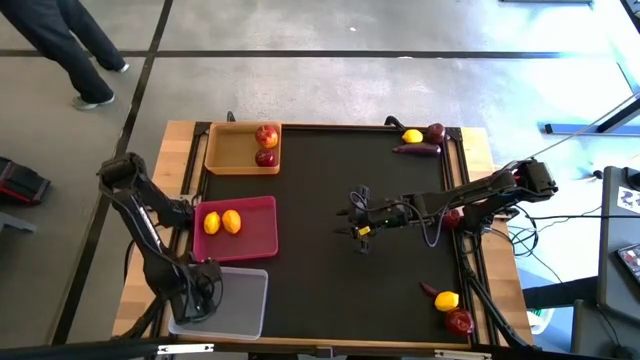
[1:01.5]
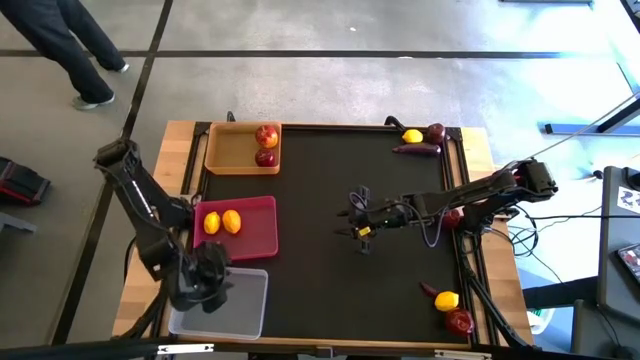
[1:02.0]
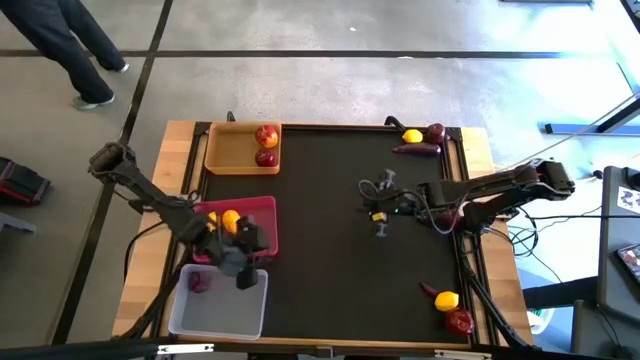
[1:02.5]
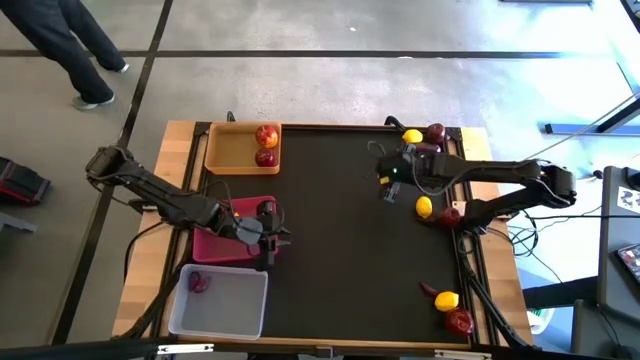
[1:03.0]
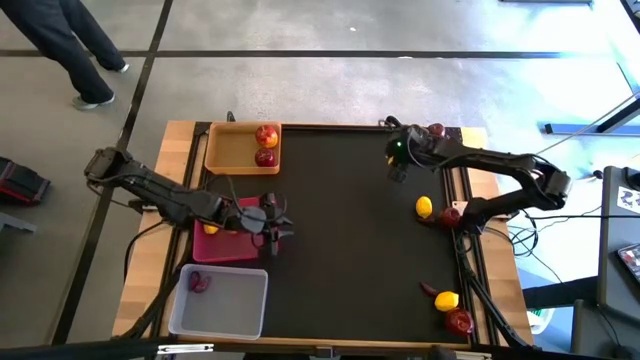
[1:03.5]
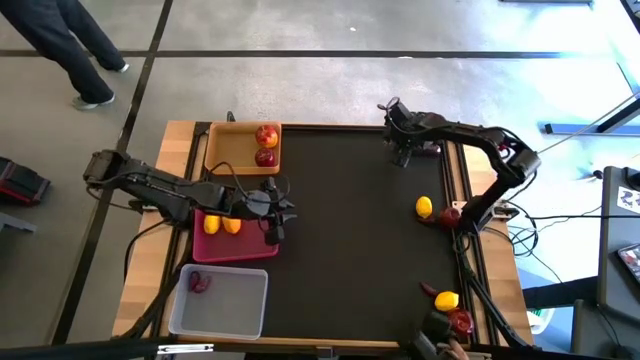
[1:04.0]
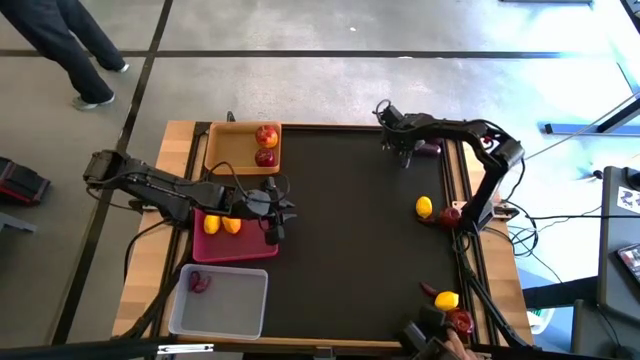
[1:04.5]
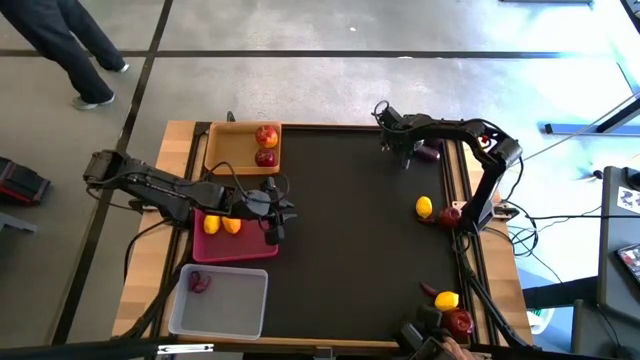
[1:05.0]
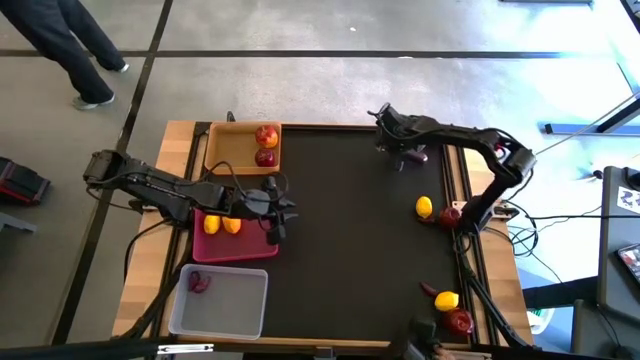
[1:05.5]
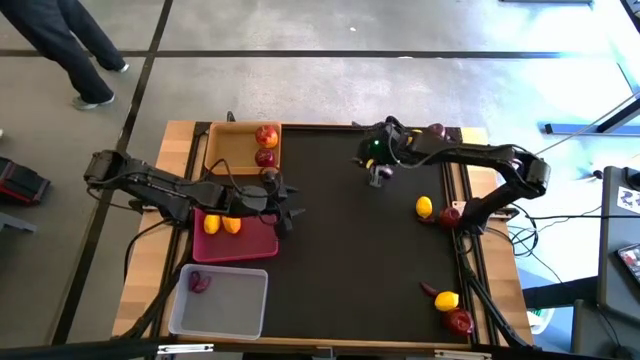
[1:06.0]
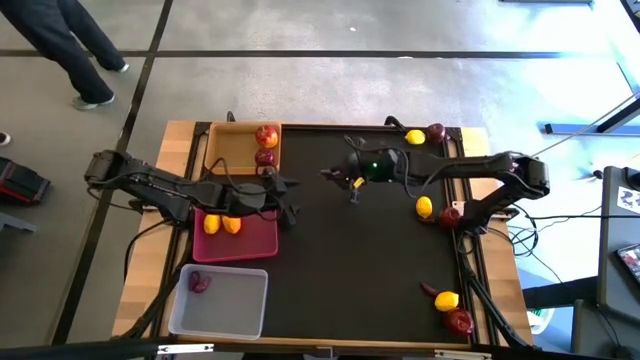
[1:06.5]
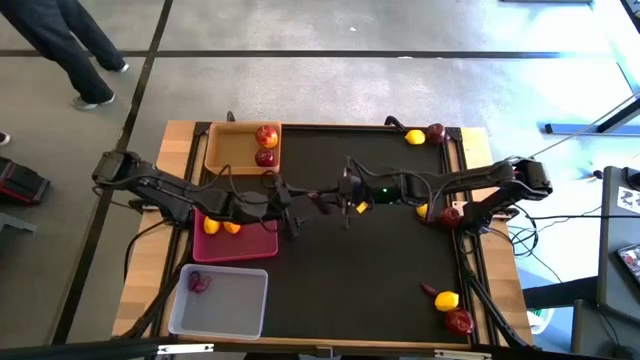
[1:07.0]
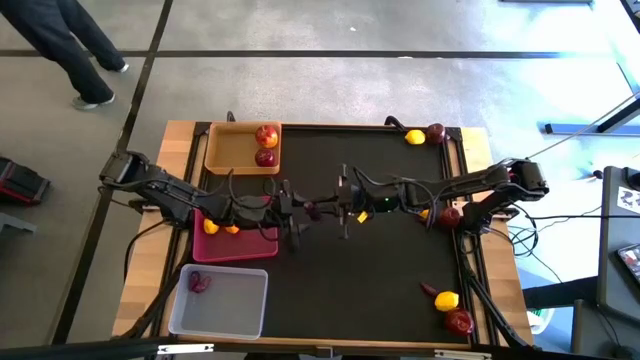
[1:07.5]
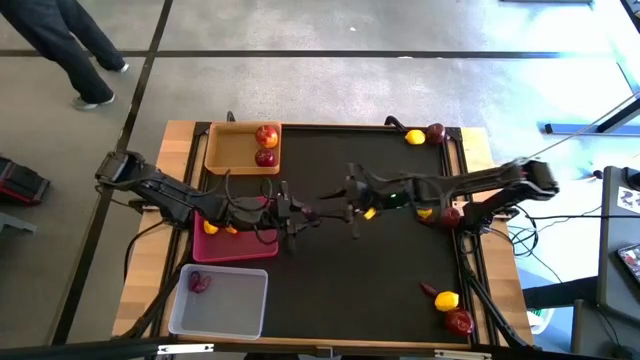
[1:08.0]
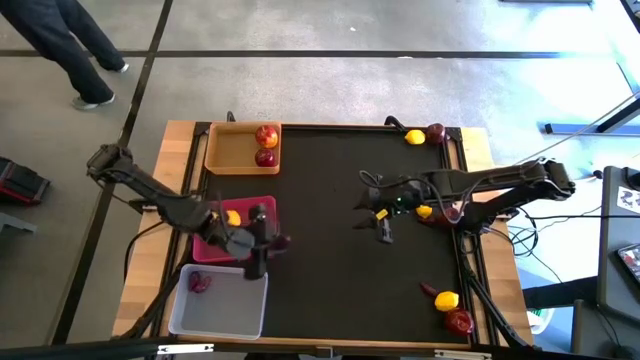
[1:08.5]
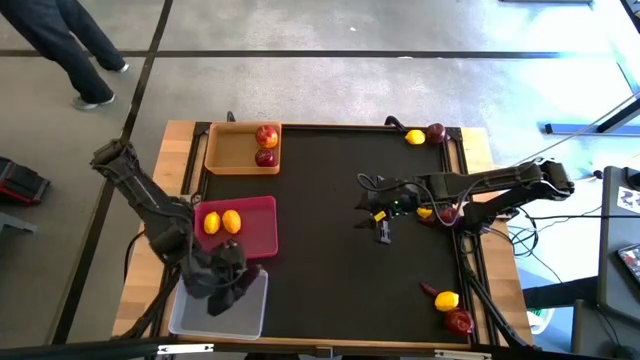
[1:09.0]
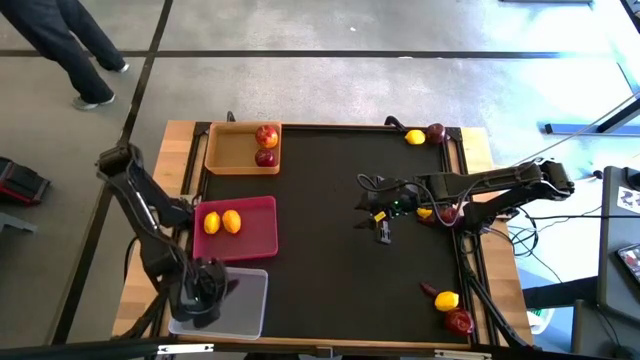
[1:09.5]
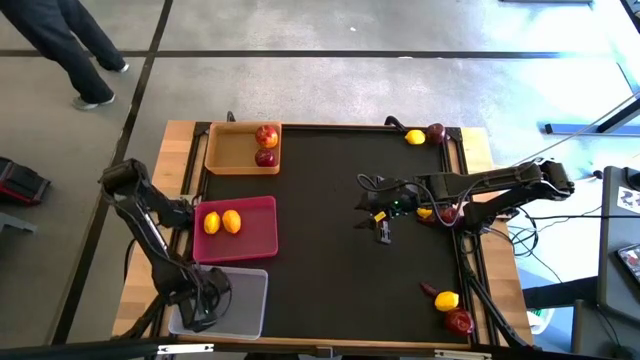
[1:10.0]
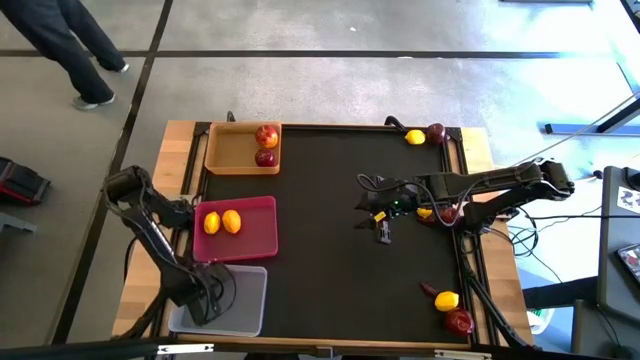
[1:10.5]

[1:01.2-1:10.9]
Task: Sort produce into baskets
Put the top eggplant into the transparent bin

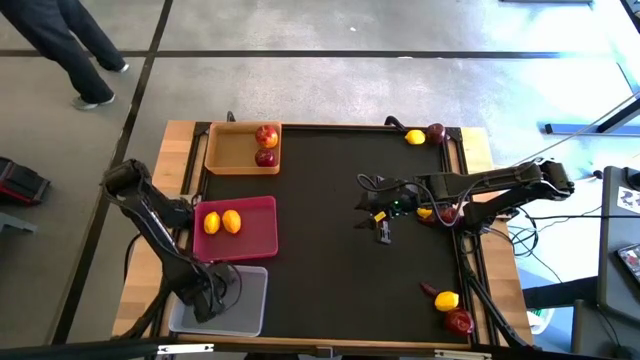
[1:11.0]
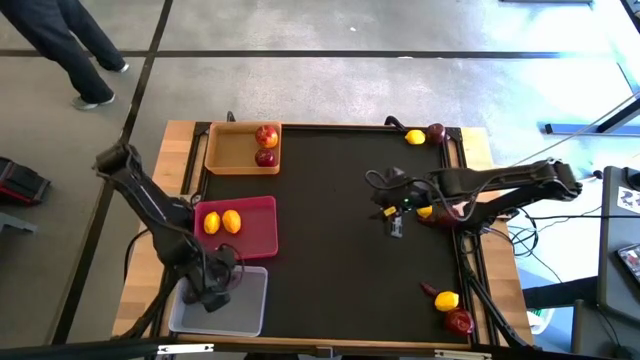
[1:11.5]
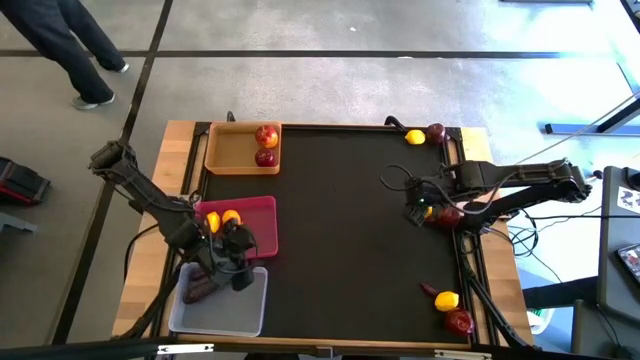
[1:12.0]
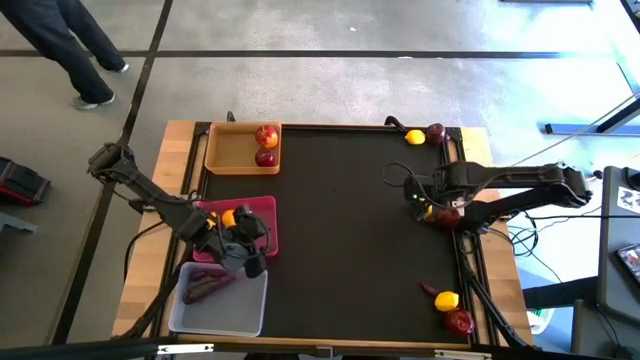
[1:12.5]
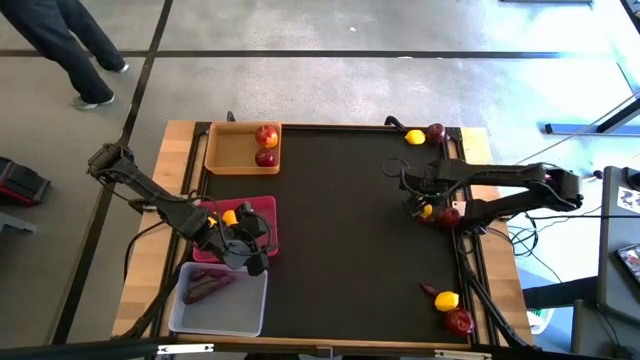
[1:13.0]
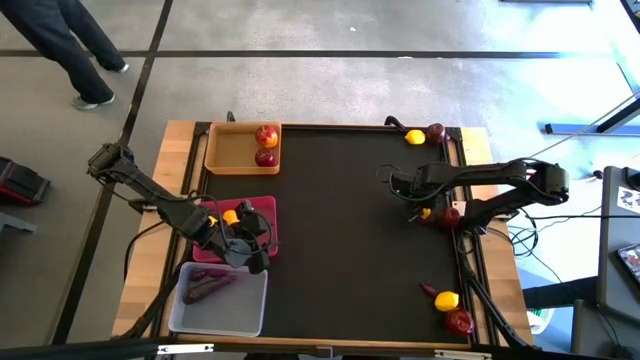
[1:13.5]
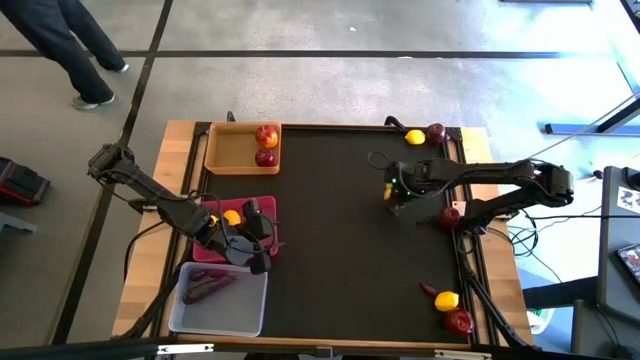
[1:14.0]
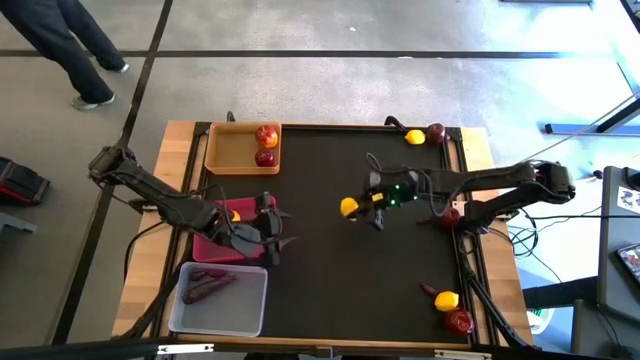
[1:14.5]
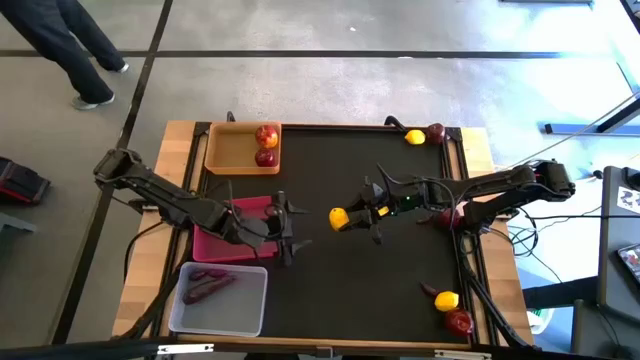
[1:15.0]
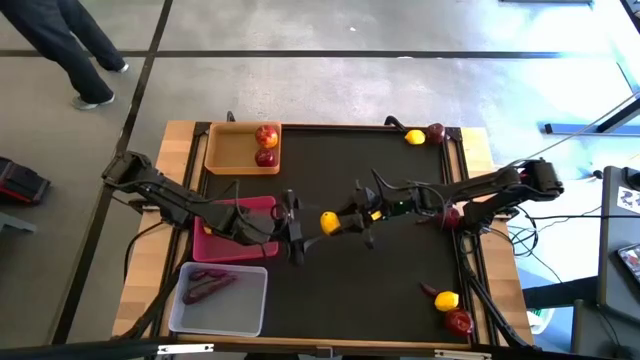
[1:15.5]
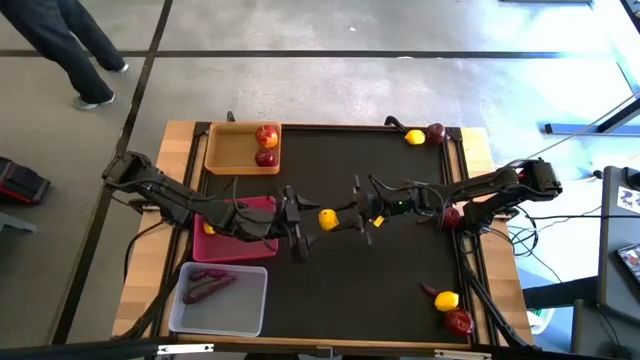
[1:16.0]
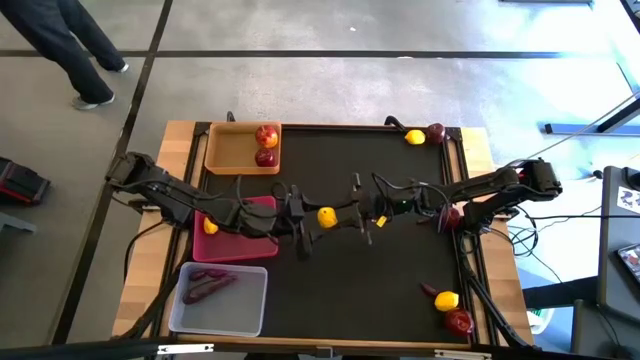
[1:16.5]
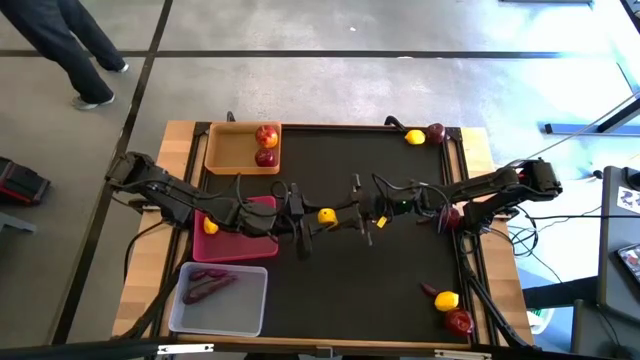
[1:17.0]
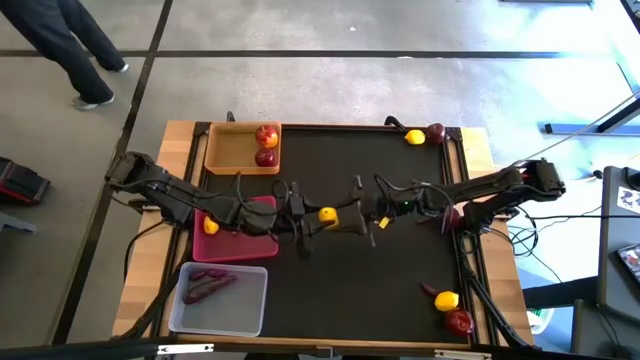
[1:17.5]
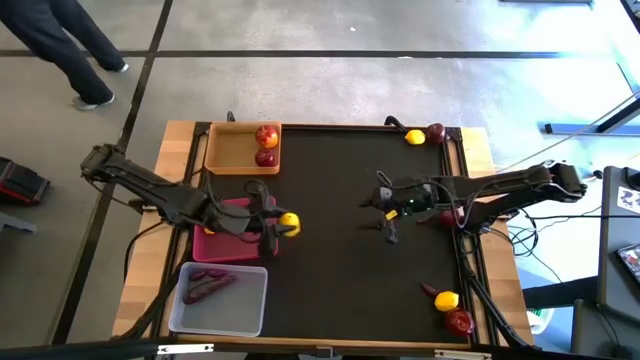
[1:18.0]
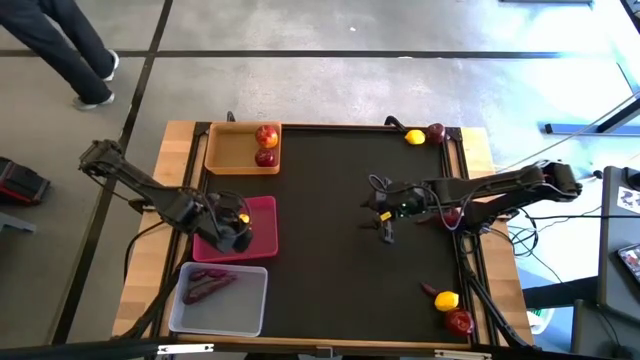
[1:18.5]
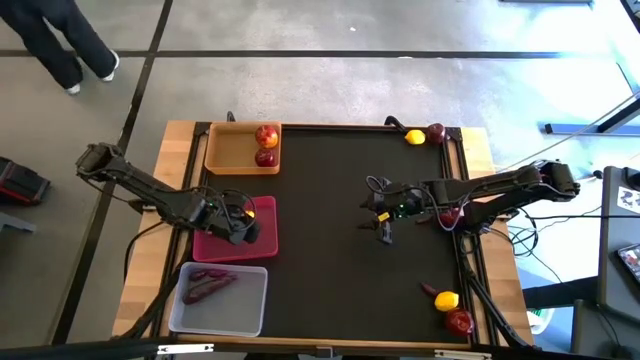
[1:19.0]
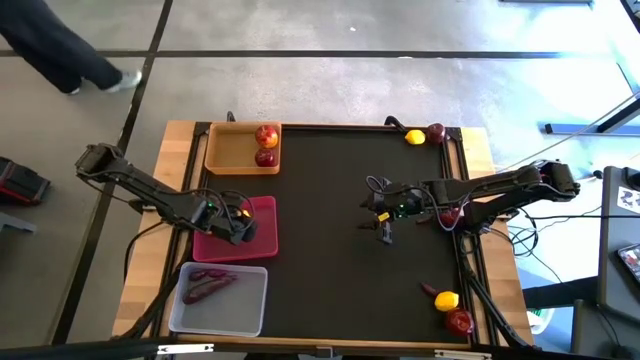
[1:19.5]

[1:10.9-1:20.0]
Put the middle lemon into the pink bin

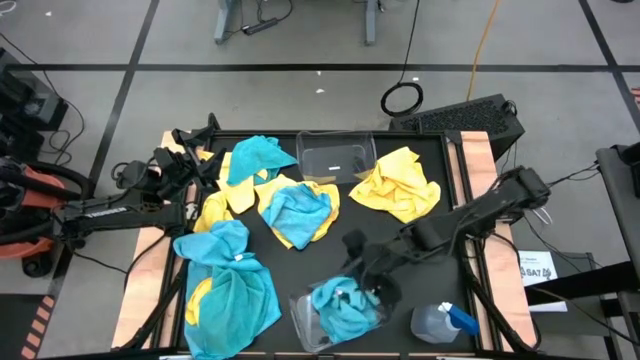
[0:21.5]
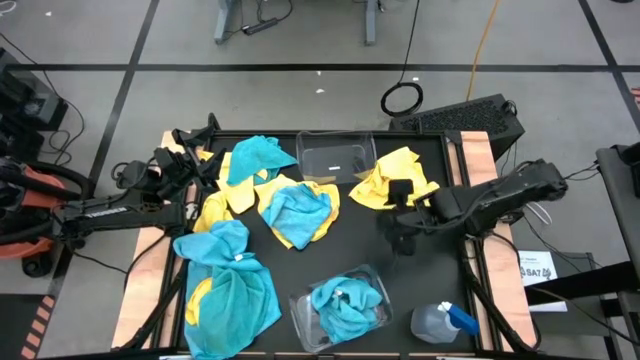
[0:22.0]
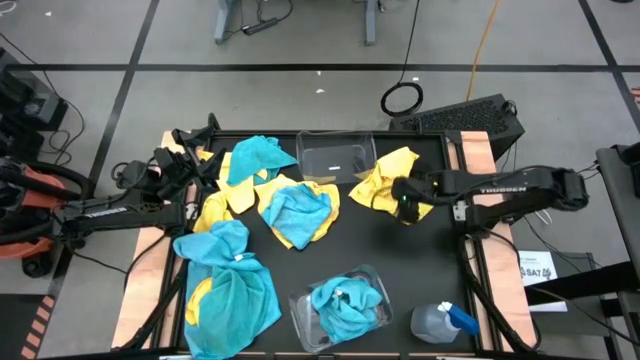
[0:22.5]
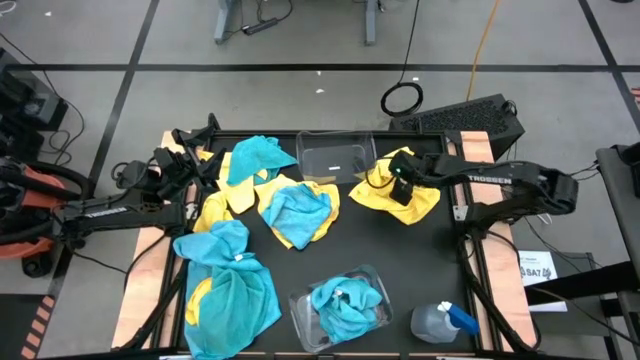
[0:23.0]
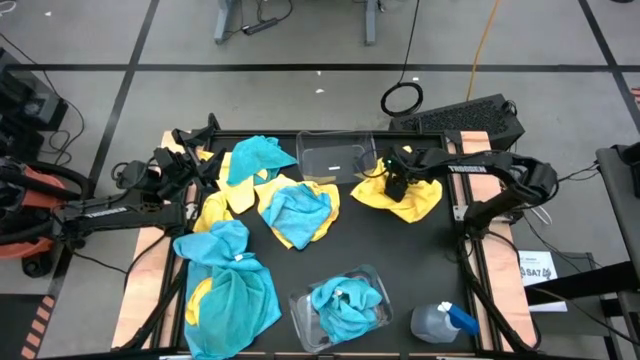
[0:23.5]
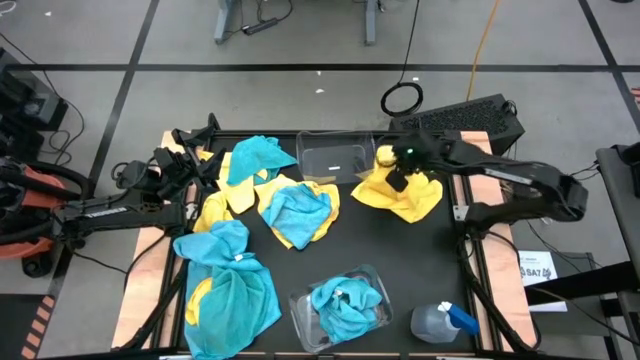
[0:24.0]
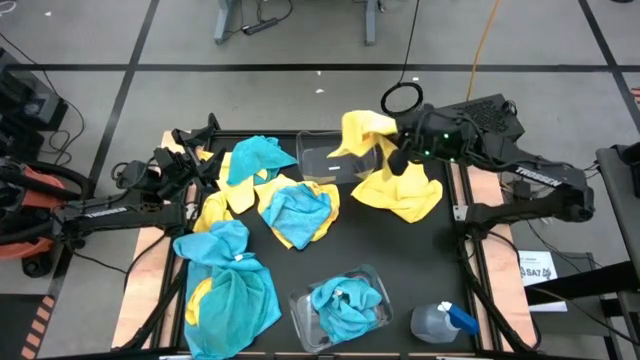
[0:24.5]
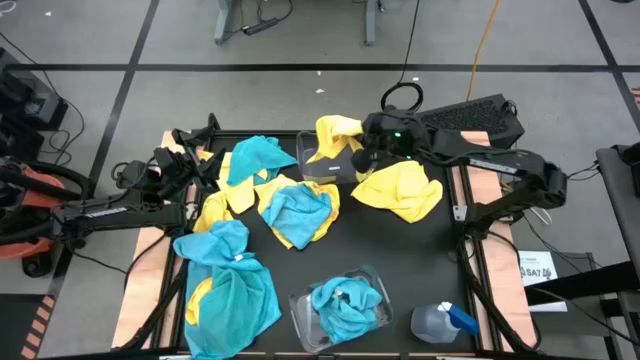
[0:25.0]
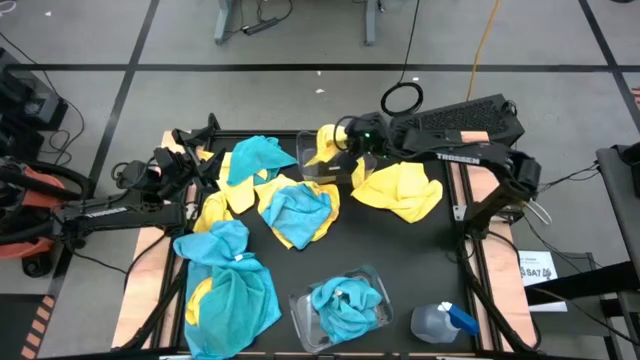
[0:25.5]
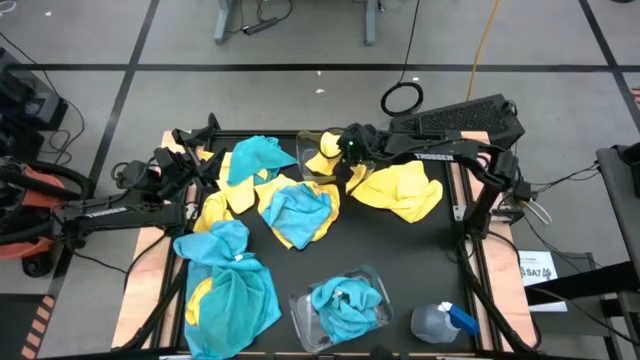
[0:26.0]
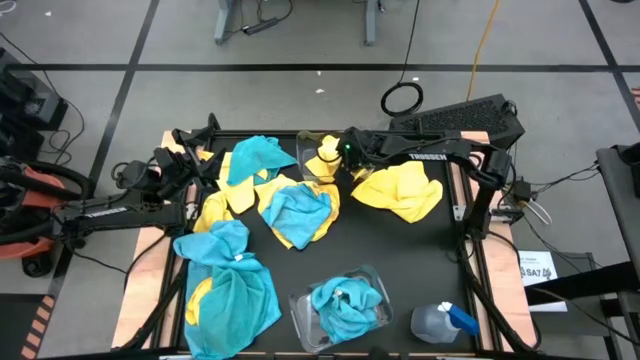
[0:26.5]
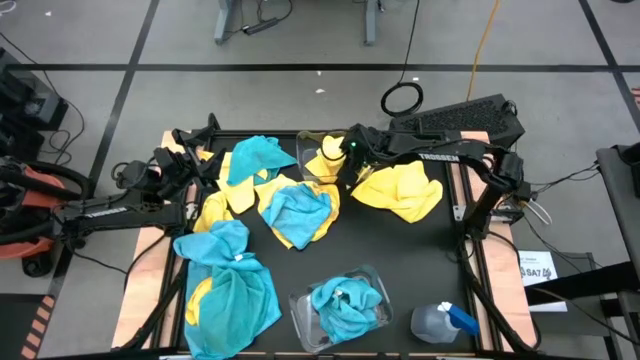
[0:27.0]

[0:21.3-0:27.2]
Task: Sort microfiber towel by color & place in baskets
Put the yellow towel into the top transparent bin
